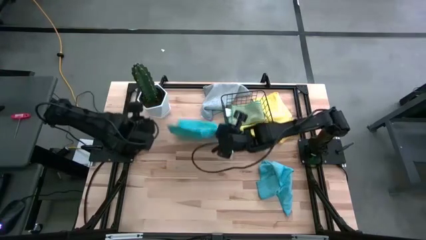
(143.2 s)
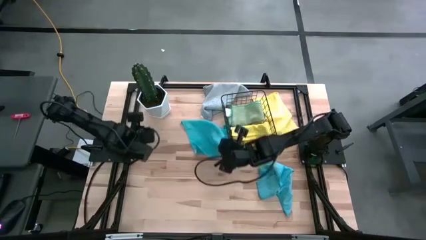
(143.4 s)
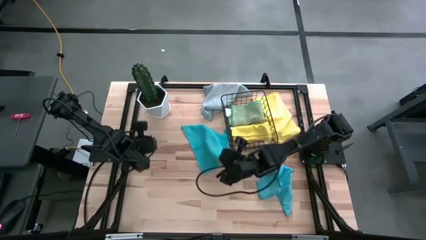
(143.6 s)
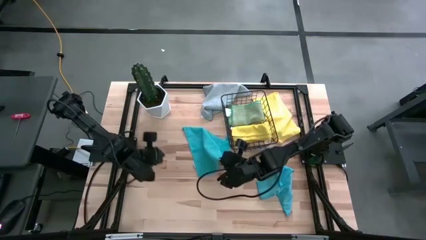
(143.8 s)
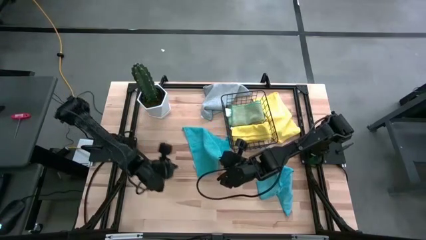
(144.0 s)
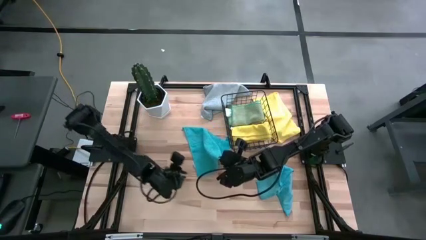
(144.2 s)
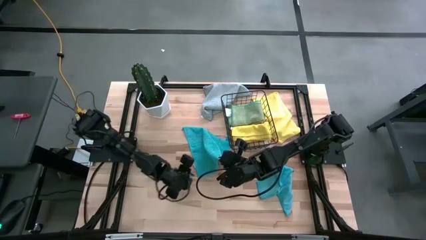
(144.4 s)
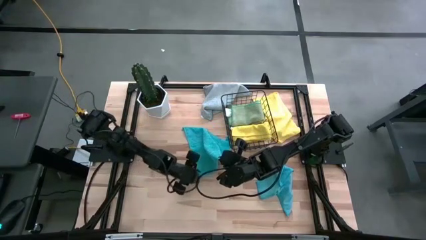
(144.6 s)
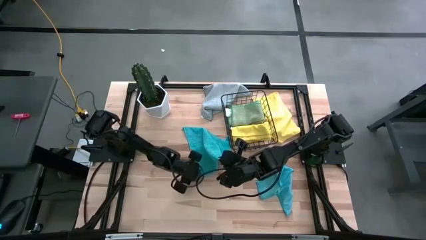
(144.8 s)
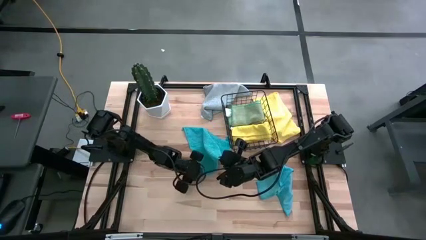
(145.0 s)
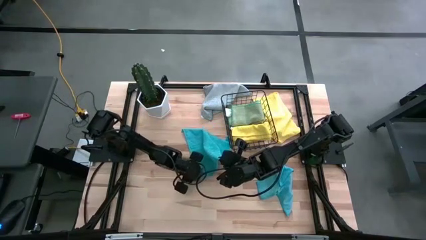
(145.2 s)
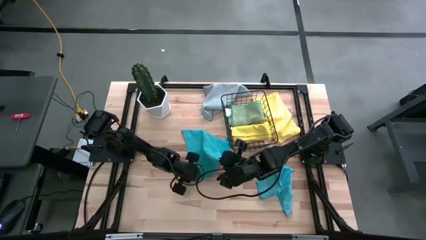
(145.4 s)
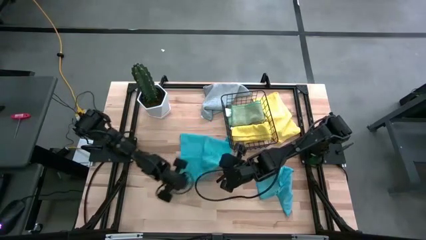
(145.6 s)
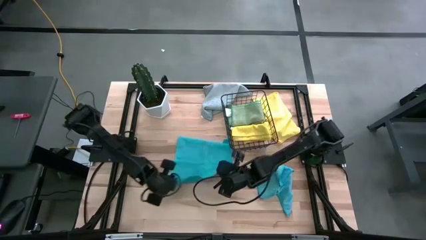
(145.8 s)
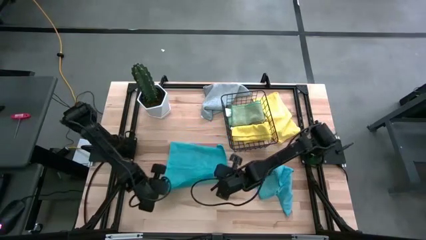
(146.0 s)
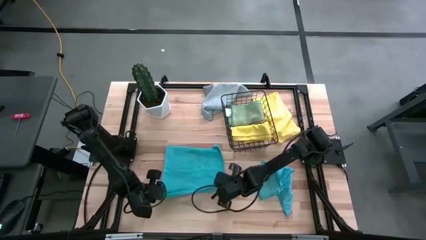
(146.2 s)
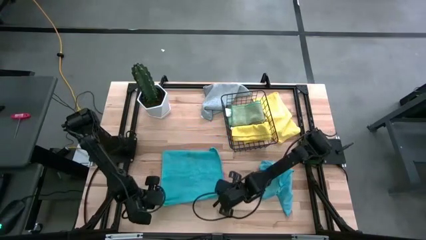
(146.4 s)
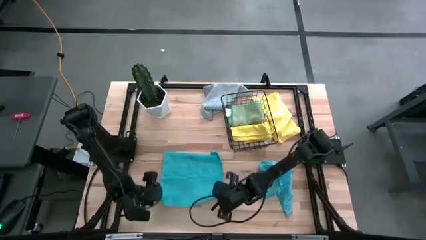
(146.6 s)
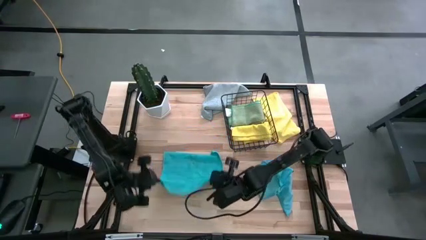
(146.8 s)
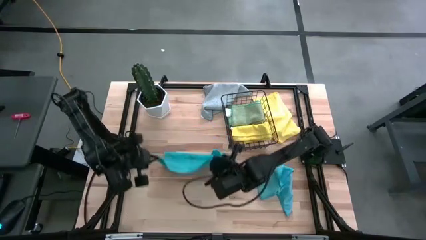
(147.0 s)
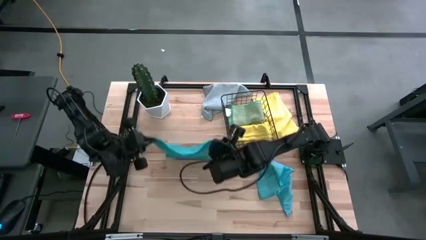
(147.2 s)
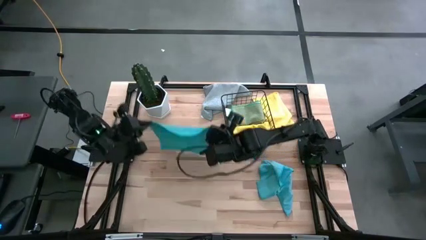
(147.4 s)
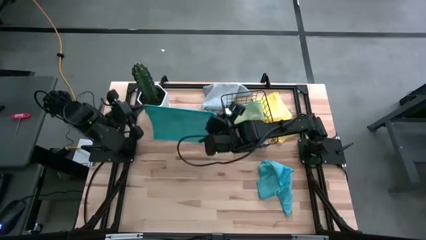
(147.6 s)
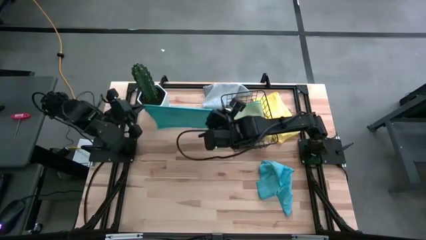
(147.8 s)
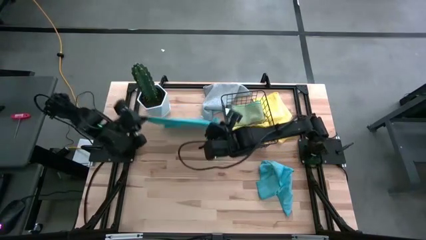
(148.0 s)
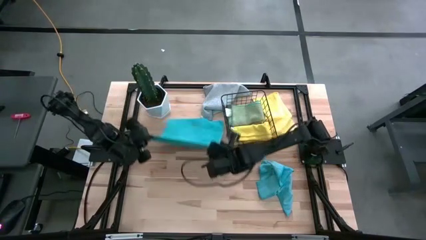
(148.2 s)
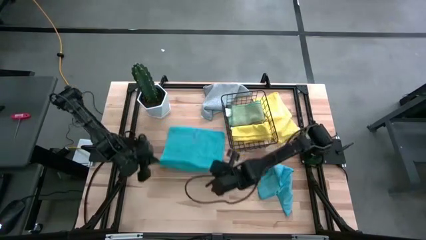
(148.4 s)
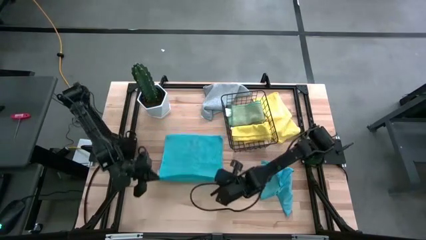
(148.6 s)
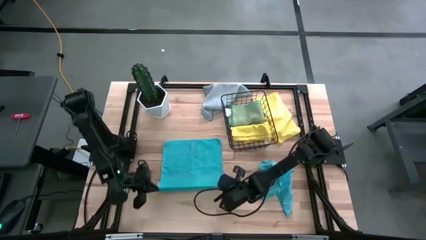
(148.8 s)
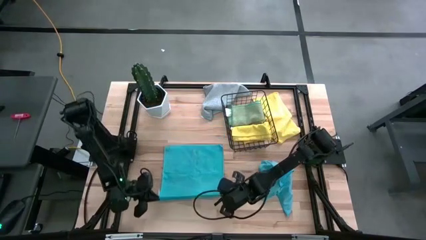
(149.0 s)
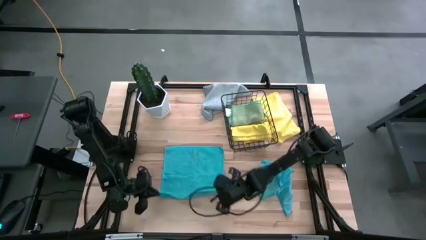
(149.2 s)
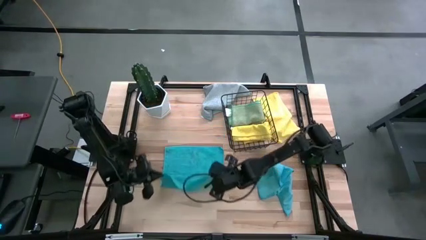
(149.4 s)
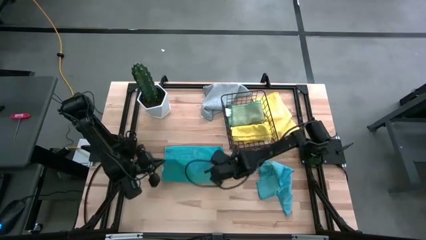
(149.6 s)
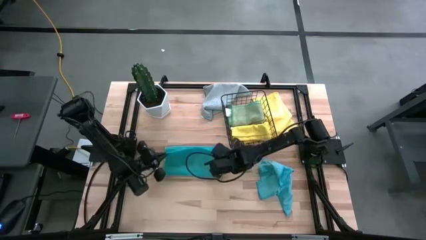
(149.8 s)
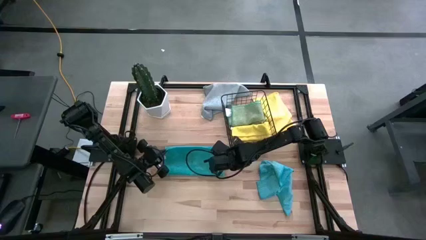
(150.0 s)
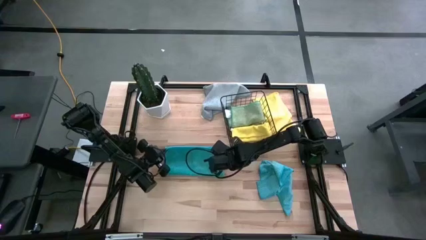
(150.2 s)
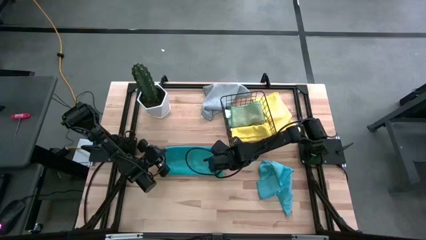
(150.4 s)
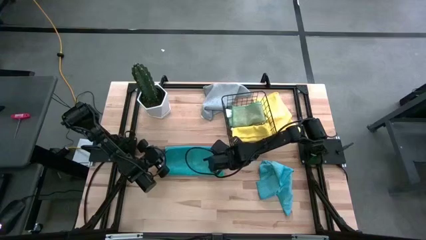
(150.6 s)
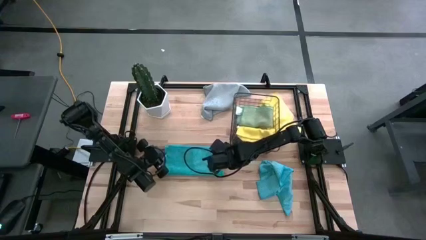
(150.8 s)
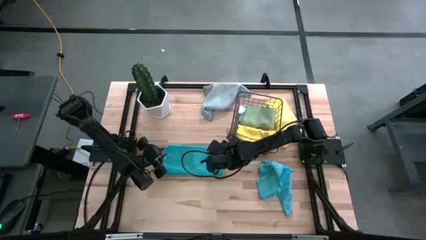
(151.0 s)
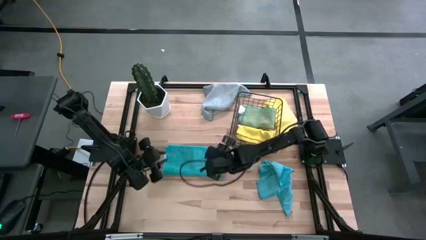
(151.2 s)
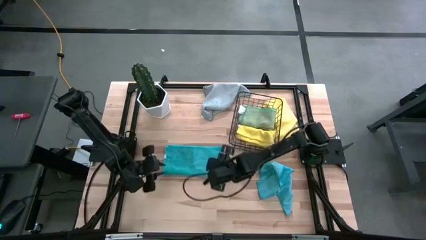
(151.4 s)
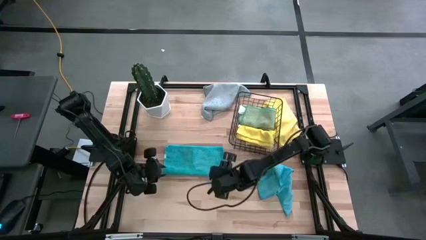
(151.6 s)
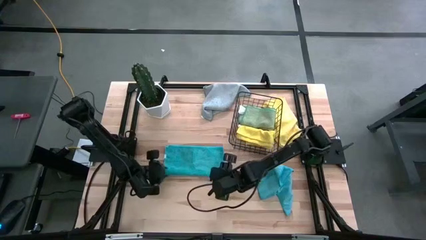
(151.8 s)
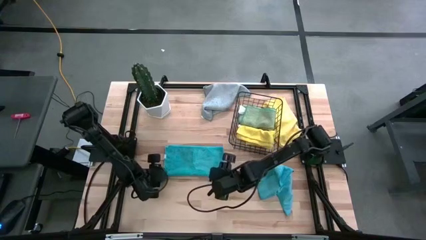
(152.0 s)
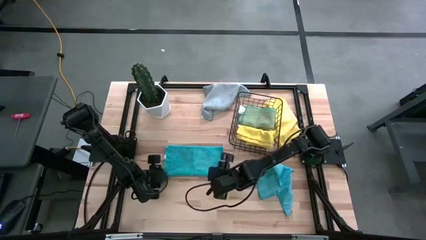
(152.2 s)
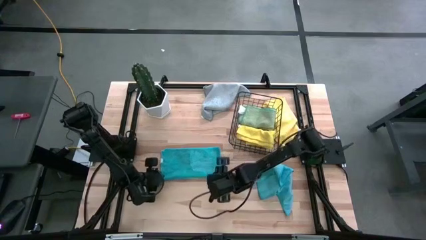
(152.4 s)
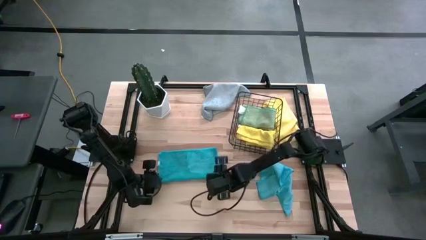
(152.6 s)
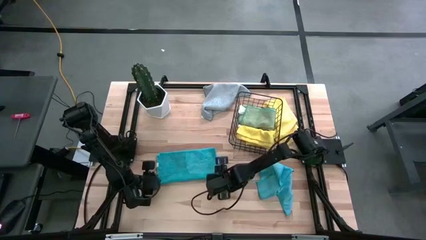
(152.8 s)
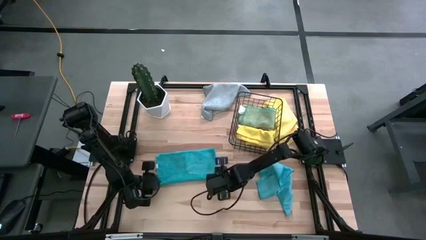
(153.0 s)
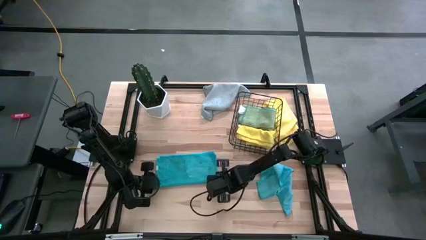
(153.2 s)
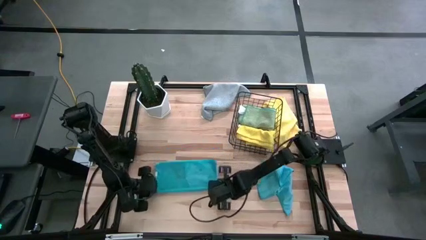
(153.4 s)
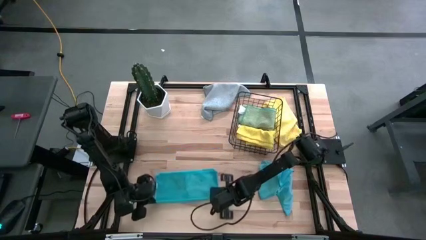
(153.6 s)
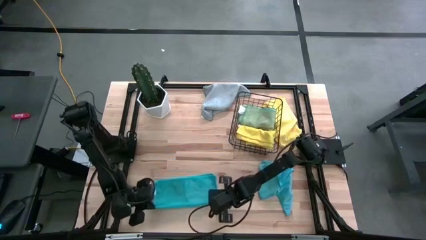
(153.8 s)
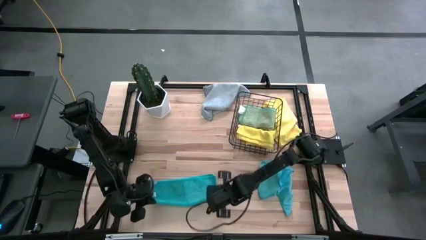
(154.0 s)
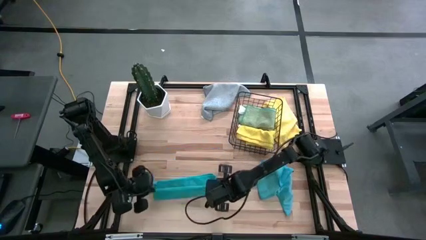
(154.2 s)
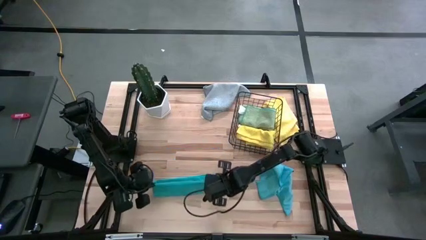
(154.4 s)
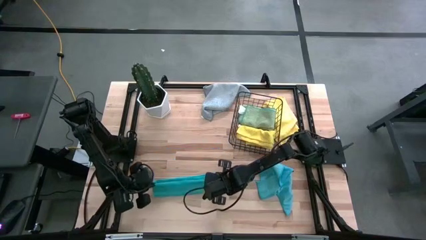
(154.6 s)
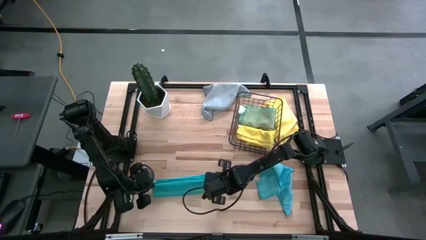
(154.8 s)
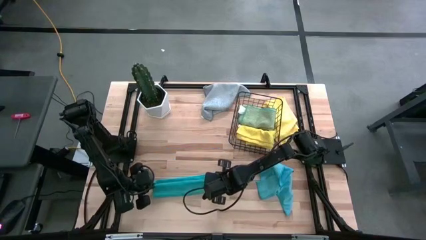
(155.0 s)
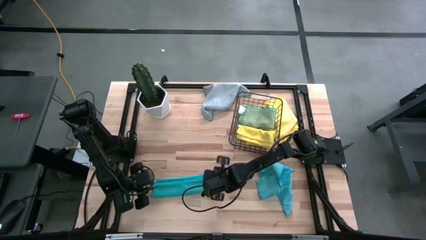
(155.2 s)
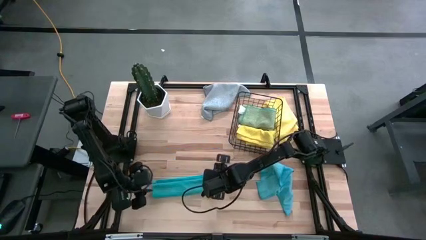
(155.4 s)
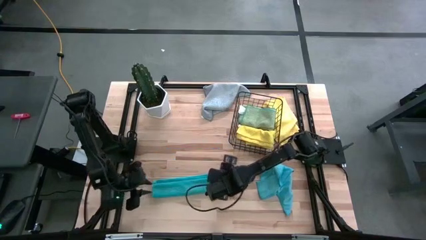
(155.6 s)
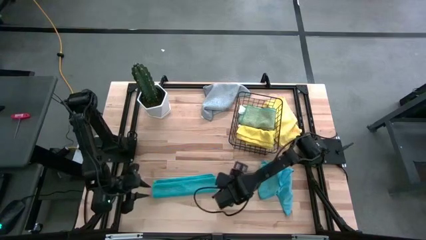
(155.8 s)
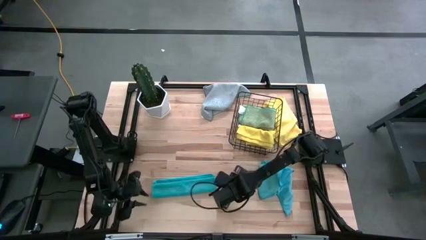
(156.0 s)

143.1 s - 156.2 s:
Task: Fold microfiber towels
Fold the top blue microfiber towel

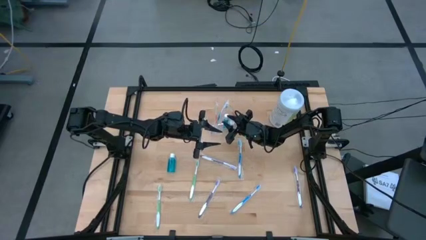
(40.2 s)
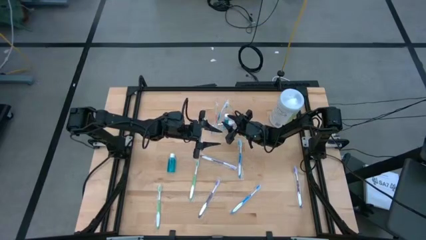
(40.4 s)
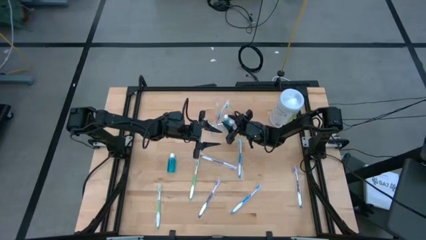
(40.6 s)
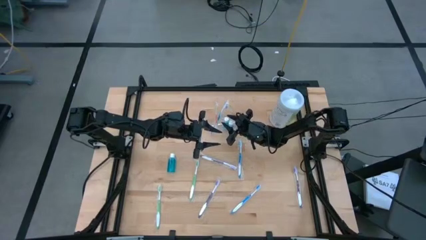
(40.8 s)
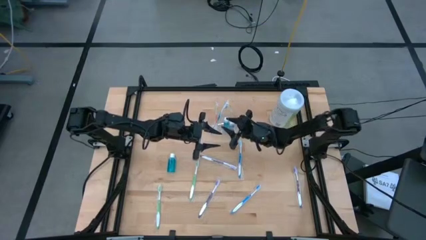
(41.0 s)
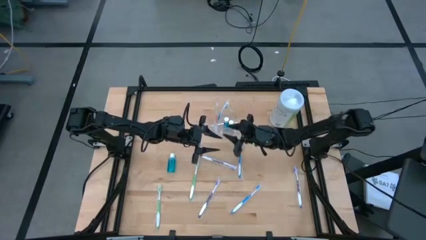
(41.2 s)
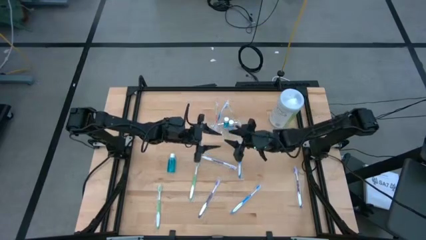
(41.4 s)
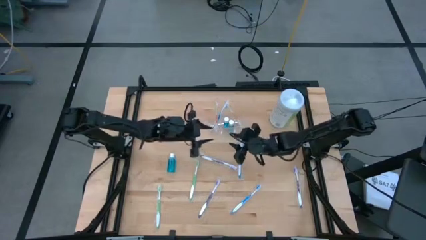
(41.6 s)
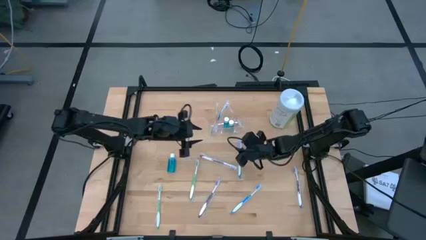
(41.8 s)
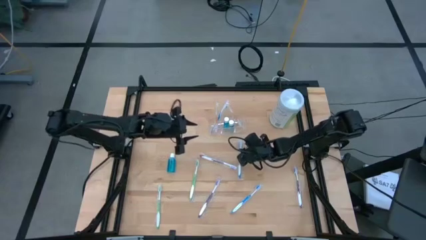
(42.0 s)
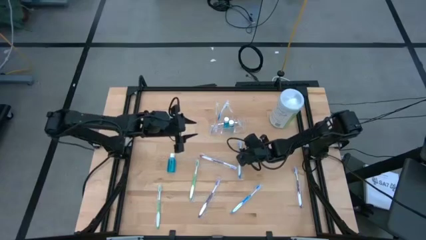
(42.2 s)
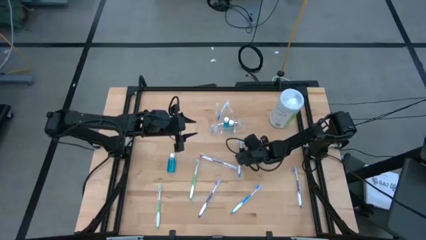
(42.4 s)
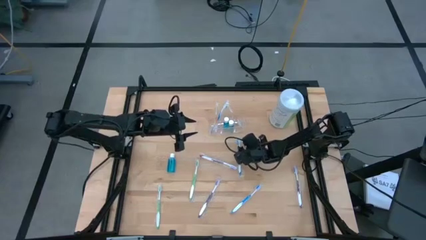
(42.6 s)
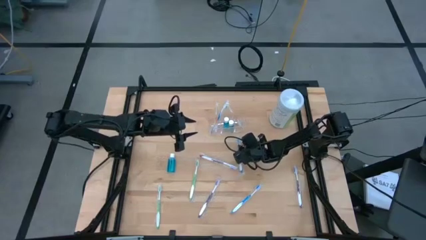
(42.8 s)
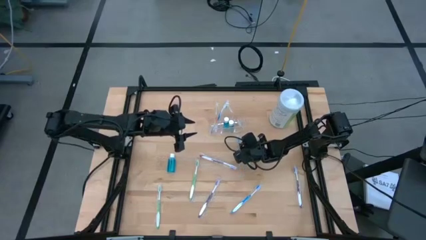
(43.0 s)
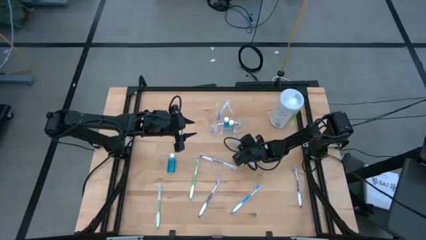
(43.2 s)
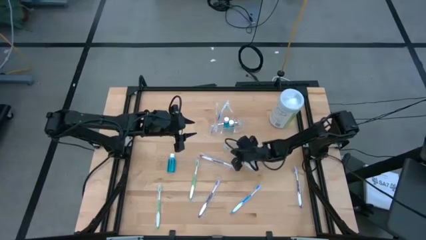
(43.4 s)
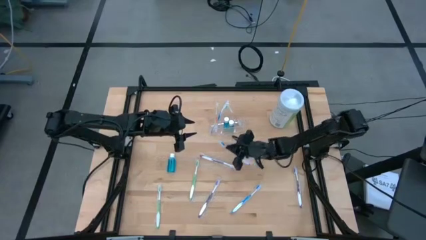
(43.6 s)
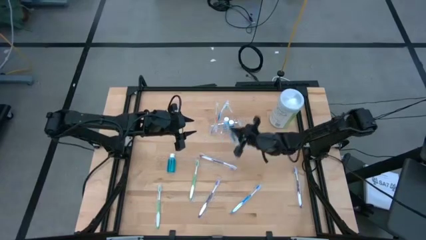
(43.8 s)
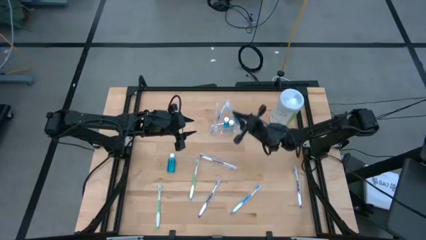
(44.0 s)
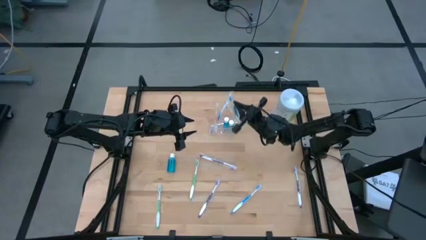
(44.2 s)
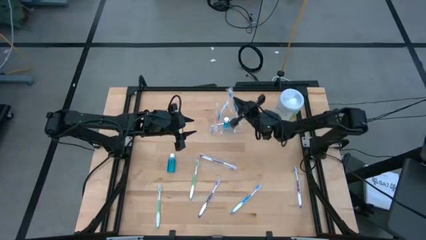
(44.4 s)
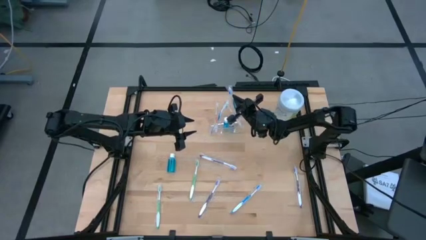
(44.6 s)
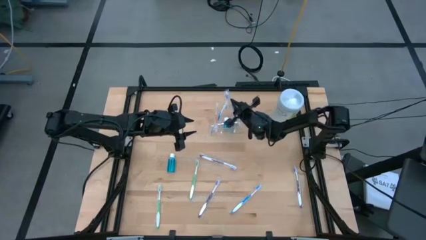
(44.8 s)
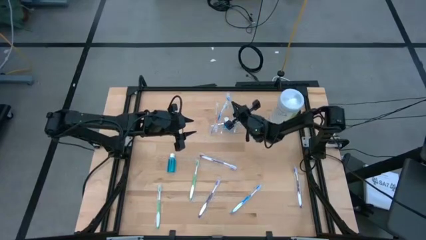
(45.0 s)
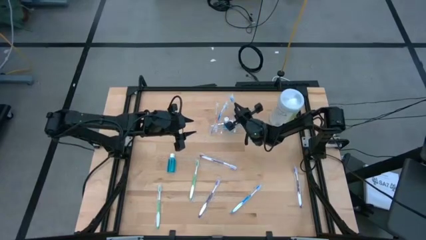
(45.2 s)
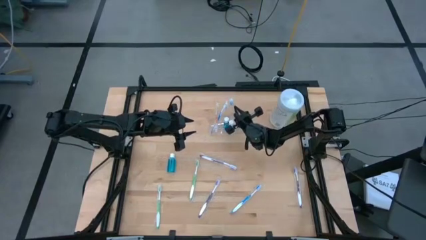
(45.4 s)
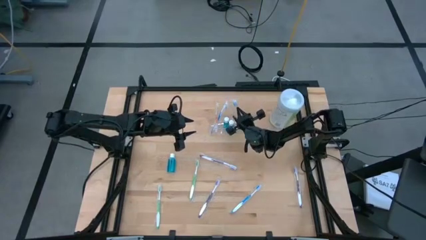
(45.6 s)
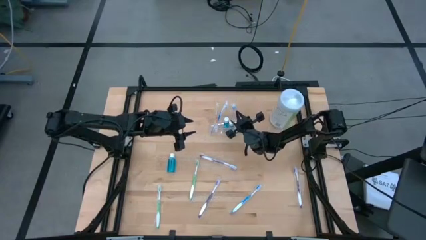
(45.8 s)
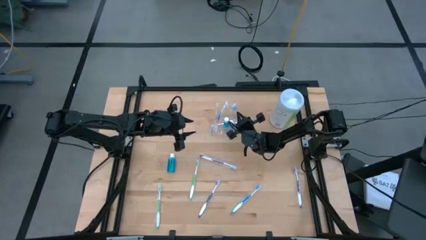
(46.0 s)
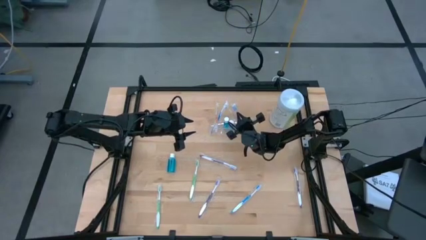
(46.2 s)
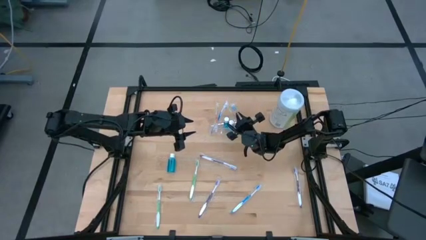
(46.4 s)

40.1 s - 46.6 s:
Task: Pick & Place toothbrushing station
Put the top blue toothbrush into the transparent organizer
